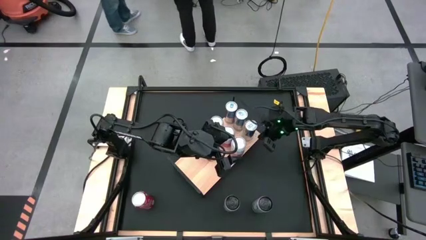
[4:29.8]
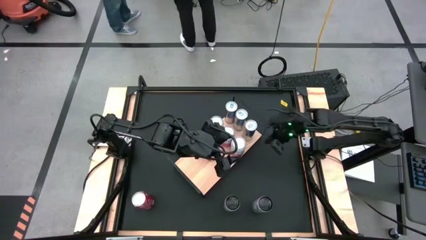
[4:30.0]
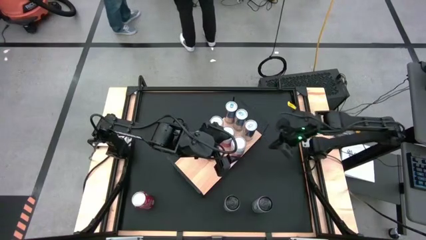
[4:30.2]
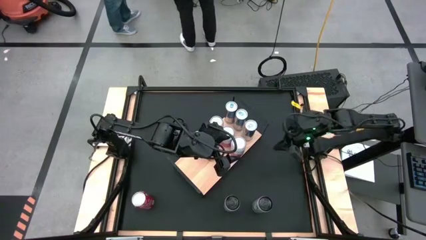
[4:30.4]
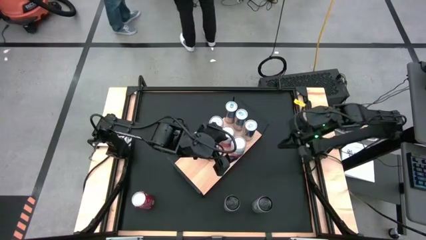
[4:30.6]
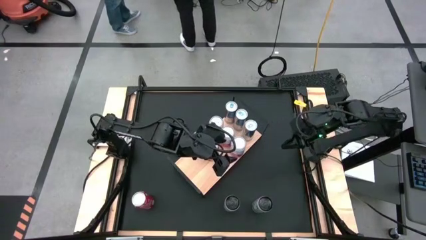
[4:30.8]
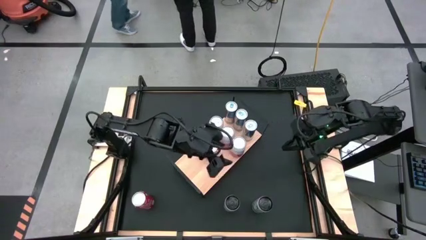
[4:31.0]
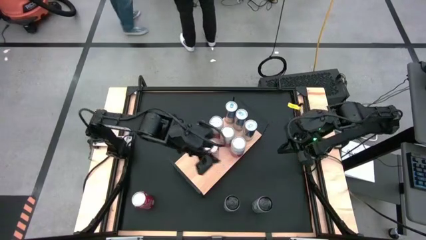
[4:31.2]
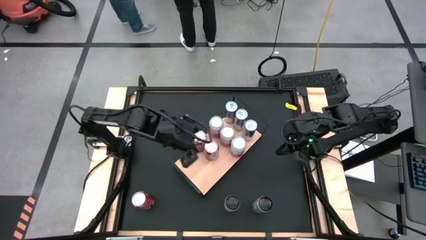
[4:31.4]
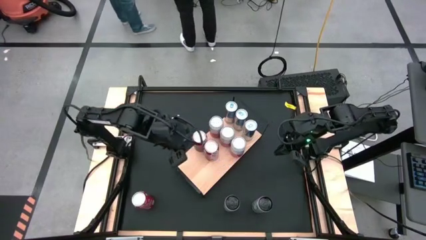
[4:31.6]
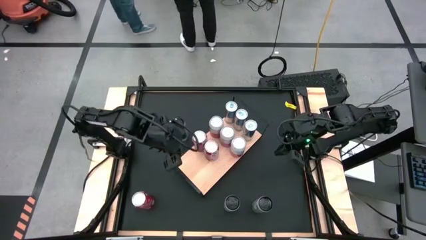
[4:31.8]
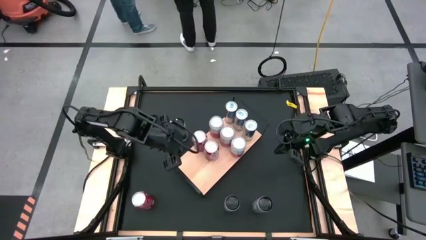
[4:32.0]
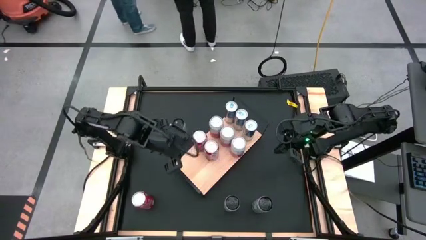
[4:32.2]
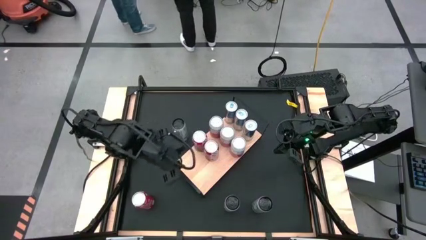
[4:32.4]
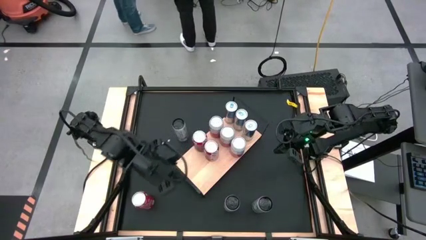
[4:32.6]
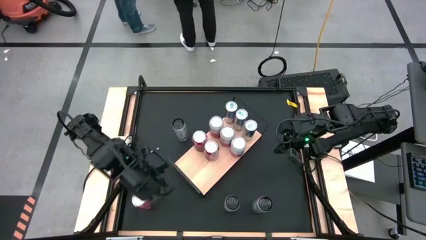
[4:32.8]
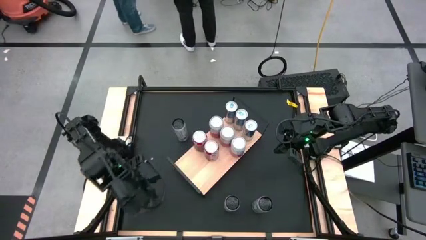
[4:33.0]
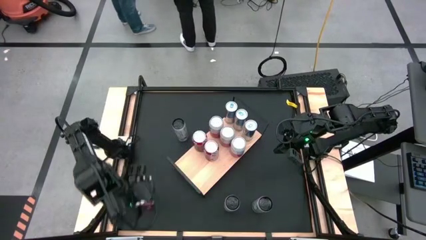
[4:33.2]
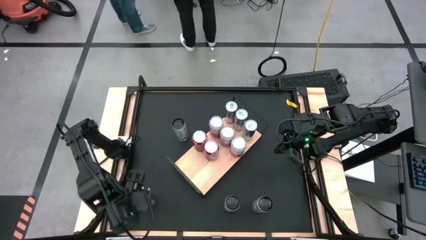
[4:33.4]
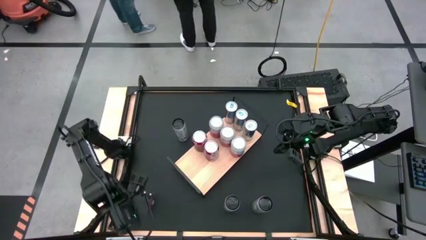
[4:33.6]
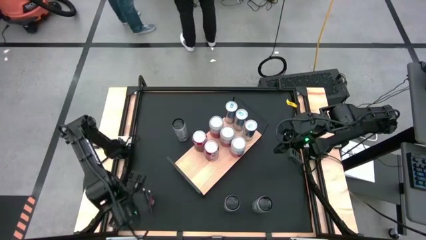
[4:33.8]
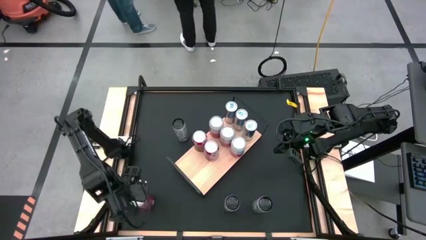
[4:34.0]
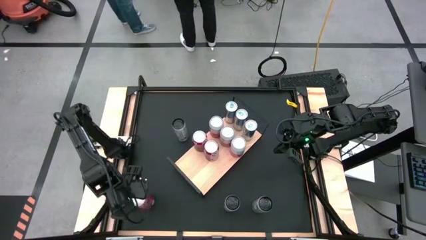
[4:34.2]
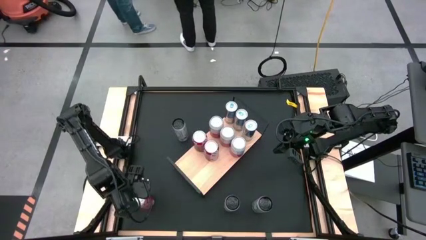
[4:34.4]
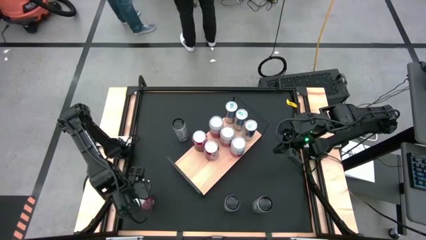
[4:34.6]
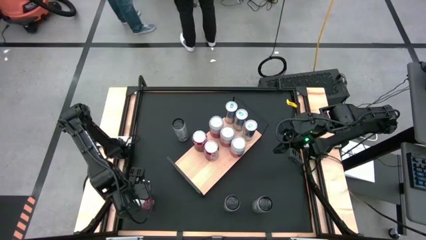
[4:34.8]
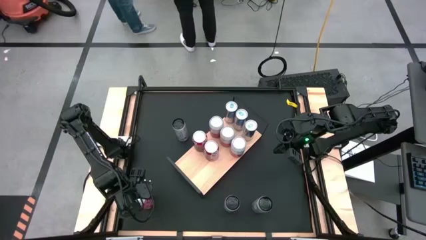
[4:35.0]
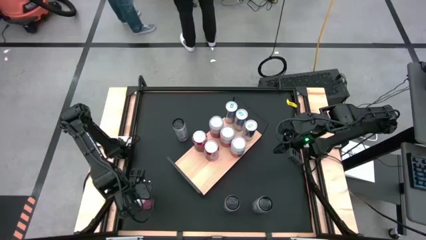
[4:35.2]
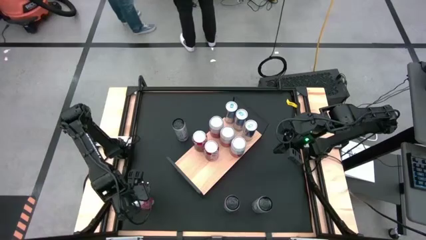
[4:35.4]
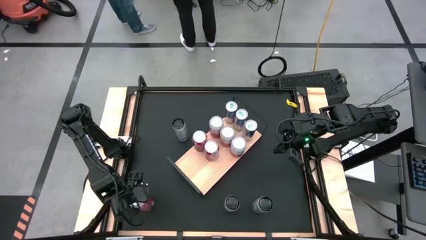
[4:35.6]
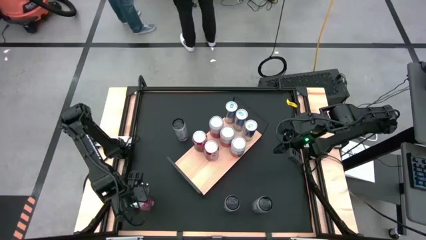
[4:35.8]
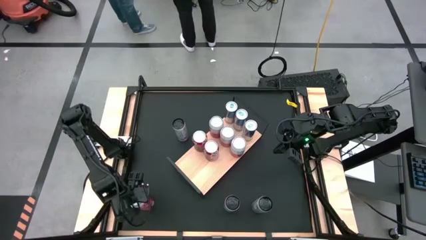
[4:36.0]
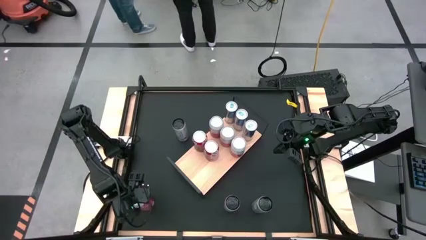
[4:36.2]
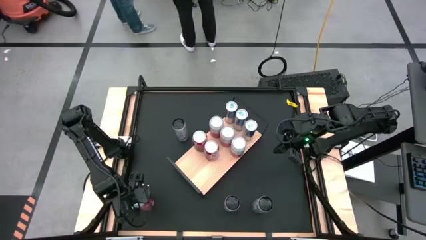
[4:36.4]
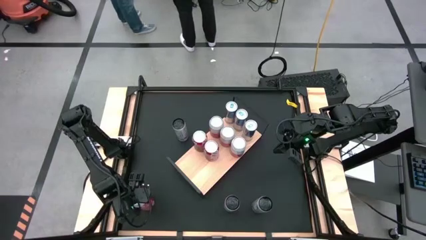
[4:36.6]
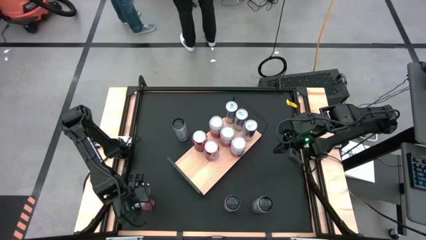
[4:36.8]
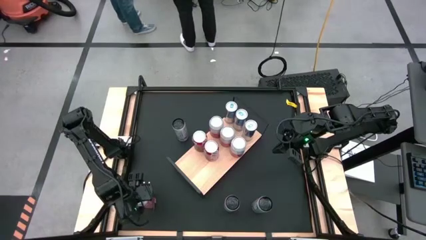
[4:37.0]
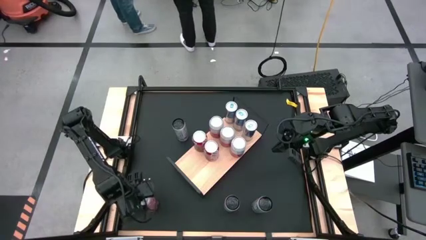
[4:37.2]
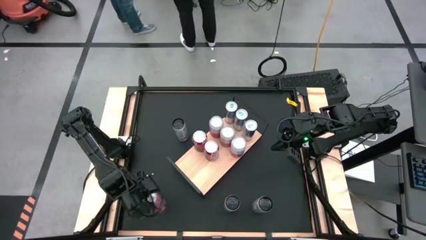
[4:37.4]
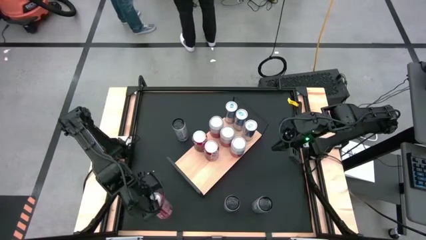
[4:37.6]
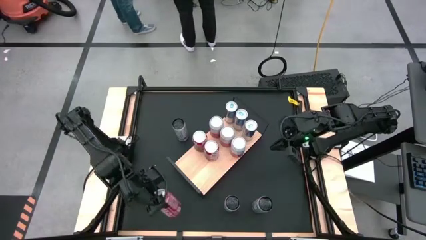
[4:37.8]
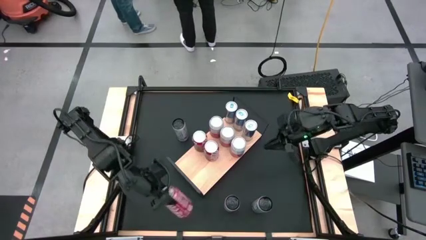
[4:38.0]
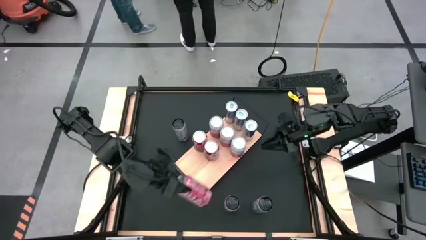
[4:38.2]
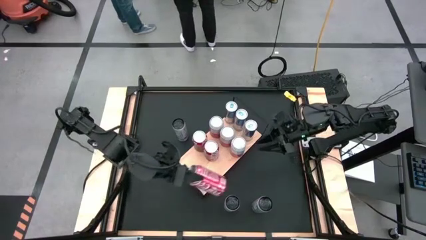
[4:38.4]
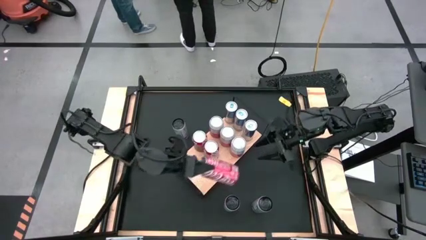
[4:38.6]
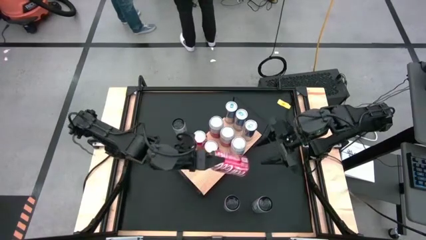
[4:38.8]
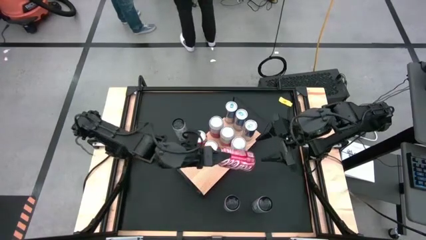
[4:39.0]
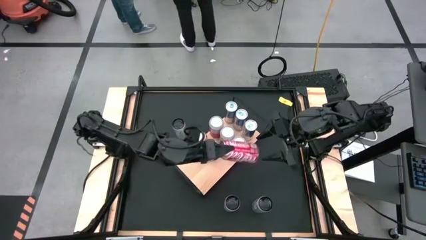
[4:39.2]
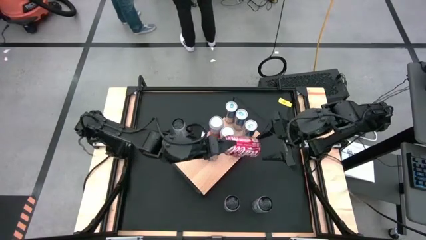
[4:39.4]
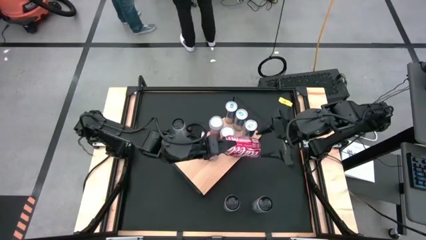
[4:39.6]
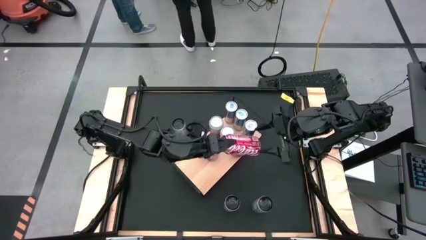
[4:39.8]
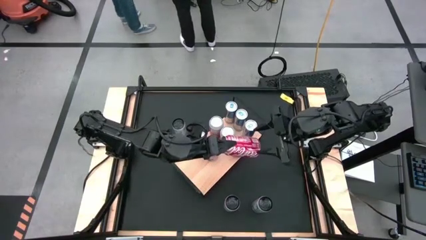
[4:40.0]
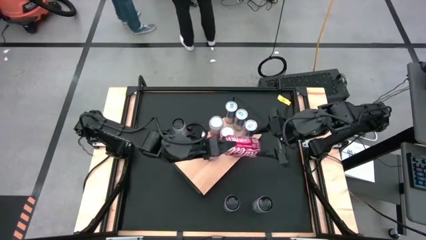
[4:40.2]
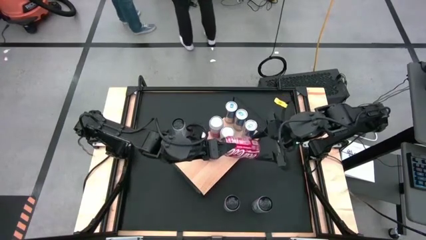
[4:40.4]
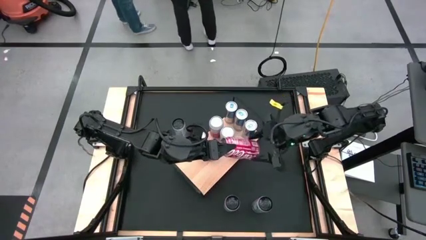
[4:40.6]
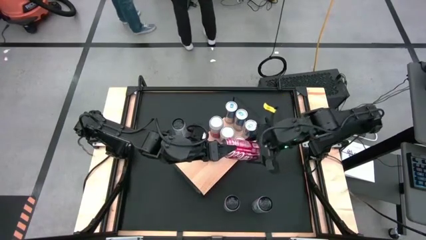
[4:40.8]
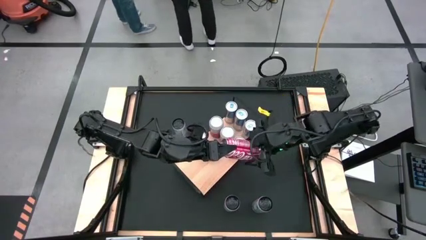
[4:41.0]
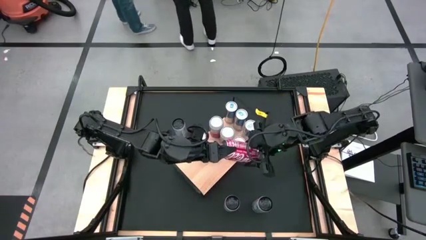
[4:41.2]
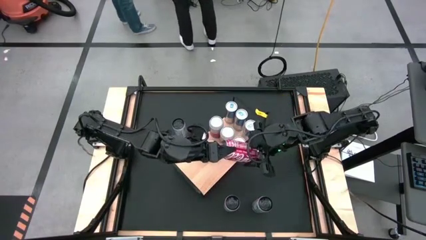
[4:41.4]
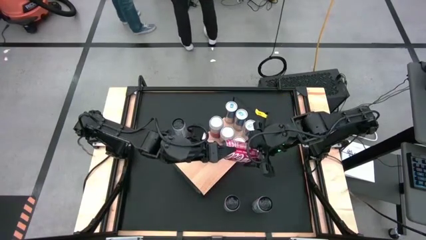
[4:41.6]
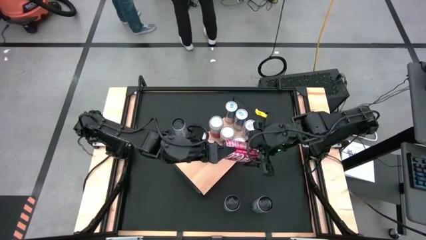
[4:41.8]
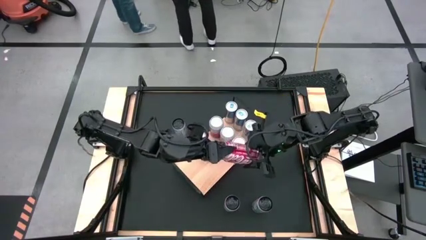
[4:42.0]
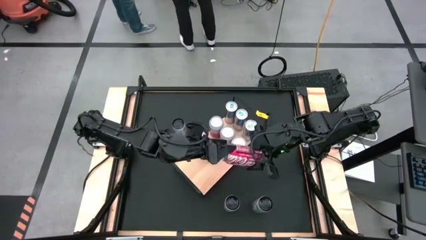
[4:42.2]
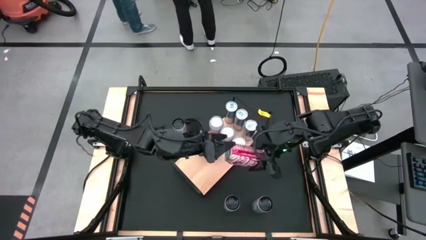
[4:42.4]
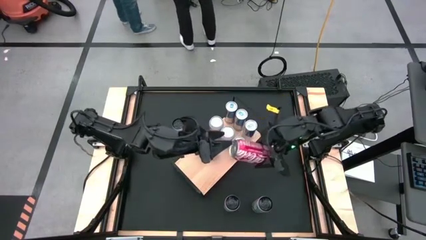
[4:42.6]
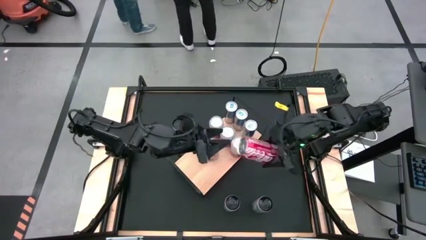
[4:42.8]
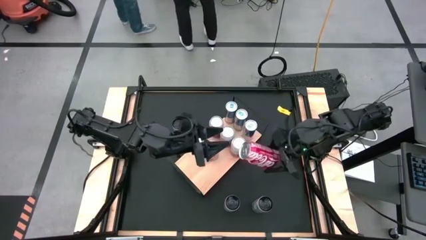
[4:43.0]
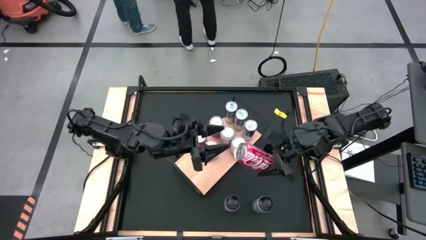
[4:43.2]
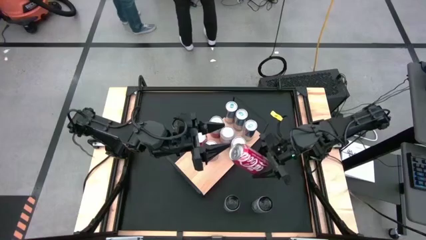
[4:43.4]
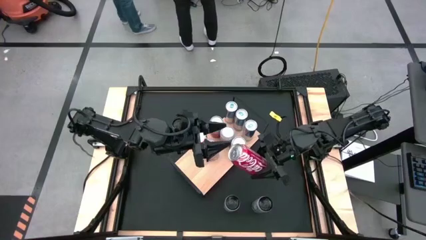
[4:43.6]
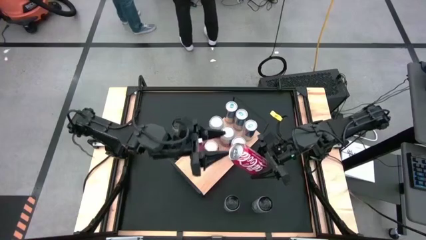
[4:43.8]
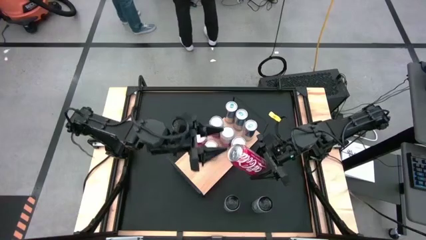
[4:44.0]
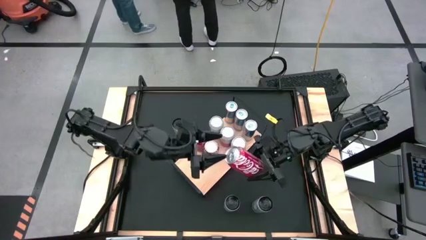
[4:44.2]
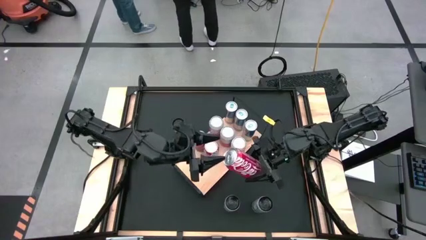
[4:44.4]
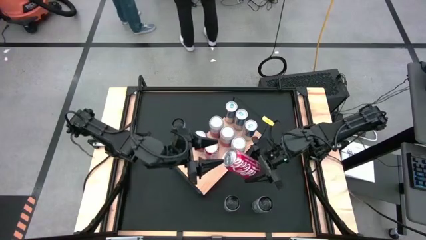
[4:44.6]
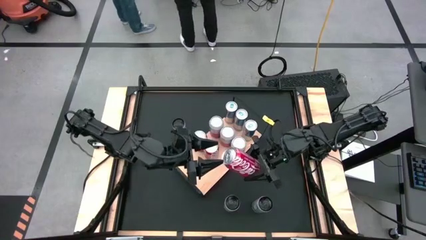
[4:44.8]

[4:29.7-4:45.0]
Task: Place canned beverage on shelf
Put the red white soda can on the shelf aligned with the other red white soda cans
